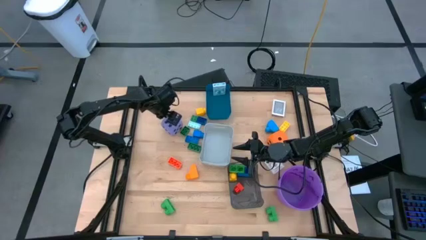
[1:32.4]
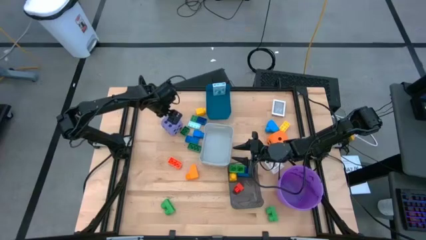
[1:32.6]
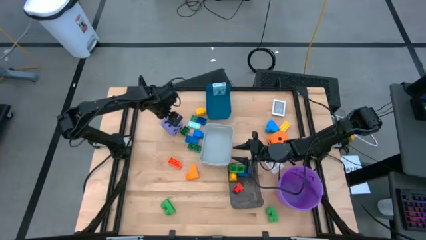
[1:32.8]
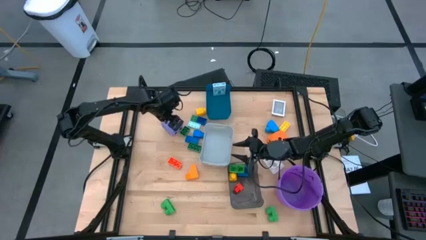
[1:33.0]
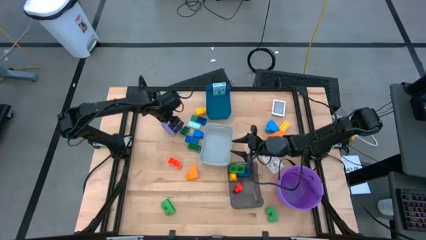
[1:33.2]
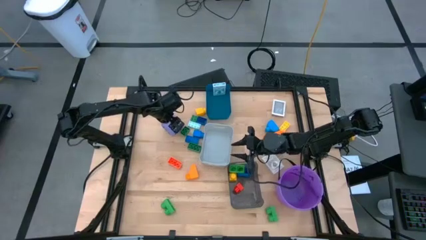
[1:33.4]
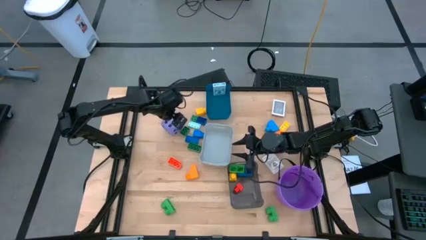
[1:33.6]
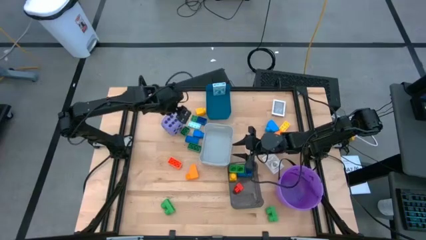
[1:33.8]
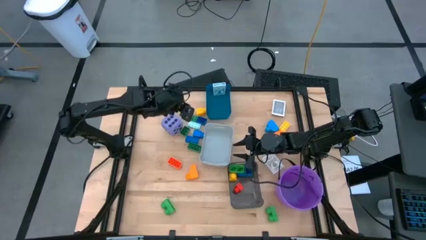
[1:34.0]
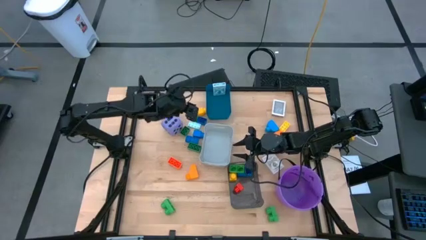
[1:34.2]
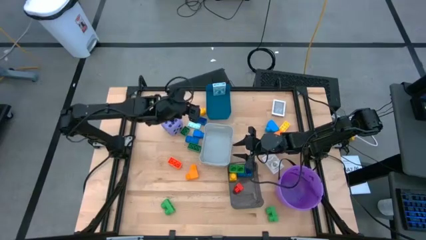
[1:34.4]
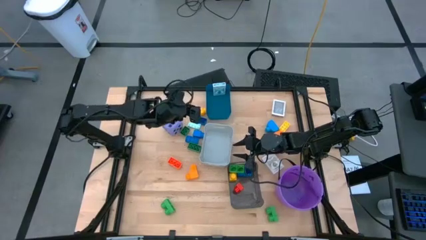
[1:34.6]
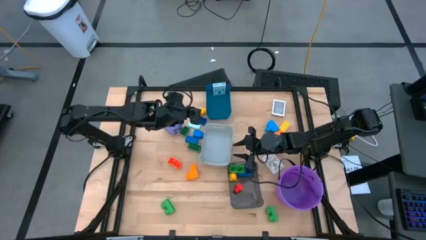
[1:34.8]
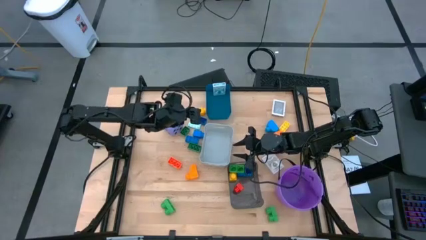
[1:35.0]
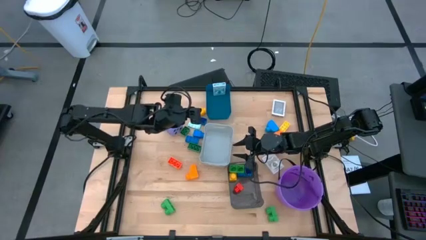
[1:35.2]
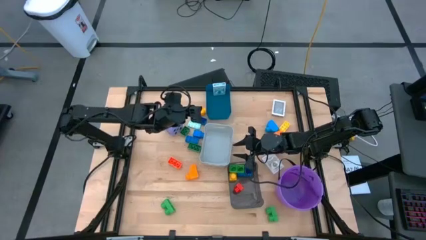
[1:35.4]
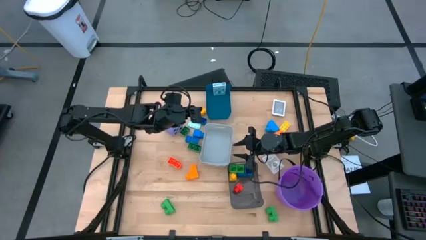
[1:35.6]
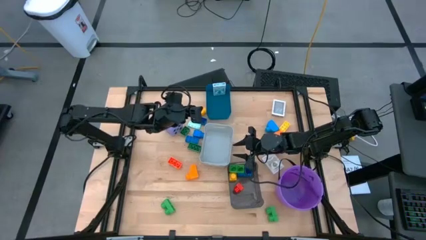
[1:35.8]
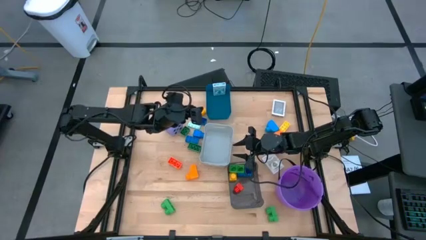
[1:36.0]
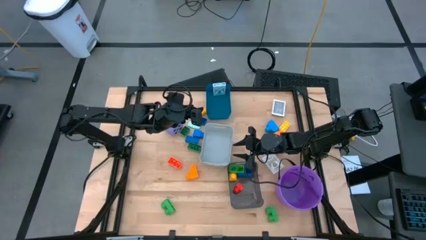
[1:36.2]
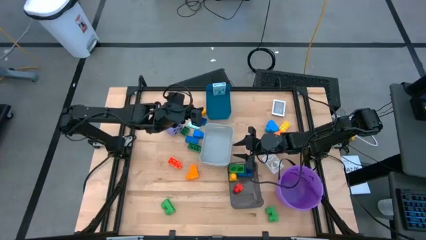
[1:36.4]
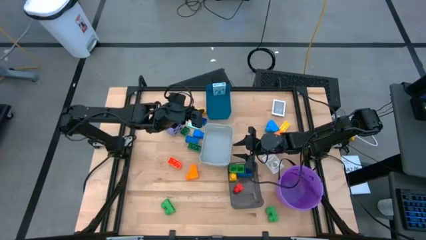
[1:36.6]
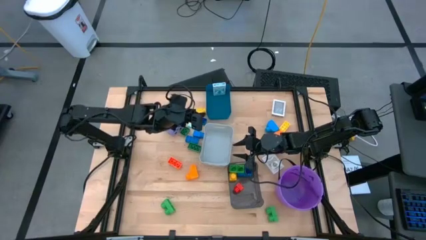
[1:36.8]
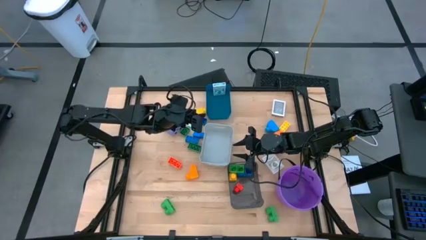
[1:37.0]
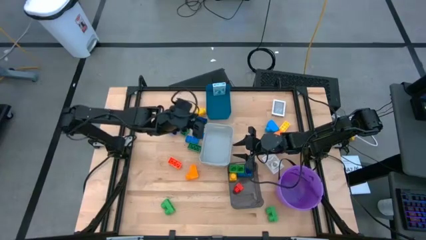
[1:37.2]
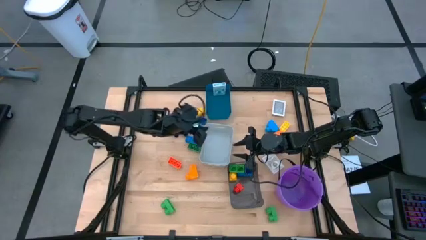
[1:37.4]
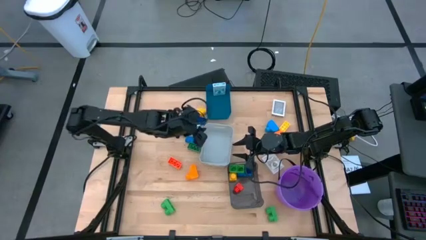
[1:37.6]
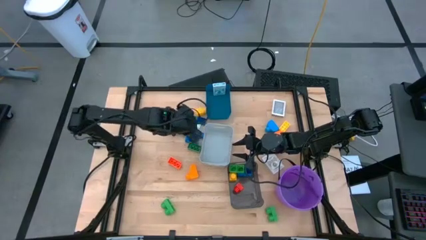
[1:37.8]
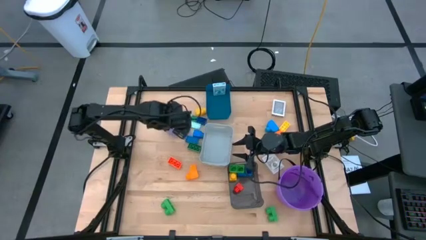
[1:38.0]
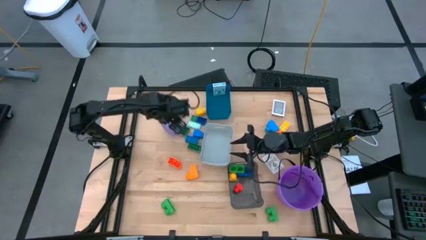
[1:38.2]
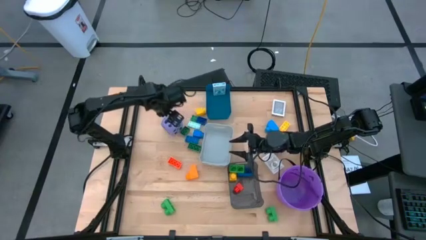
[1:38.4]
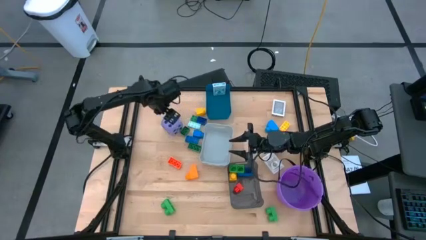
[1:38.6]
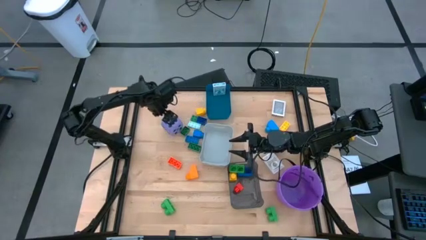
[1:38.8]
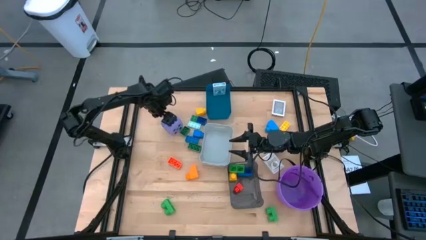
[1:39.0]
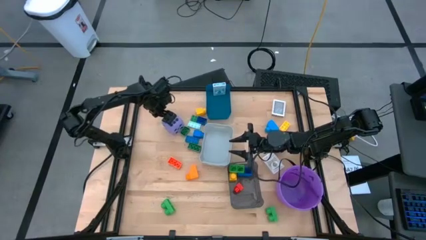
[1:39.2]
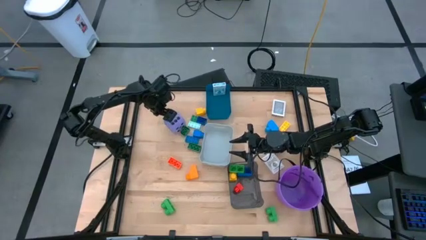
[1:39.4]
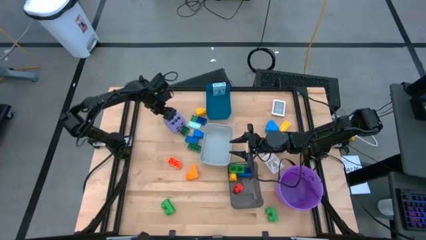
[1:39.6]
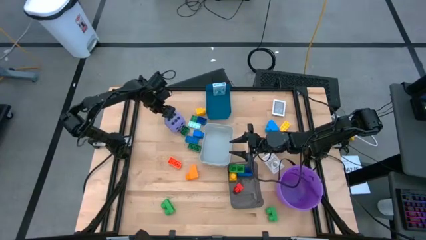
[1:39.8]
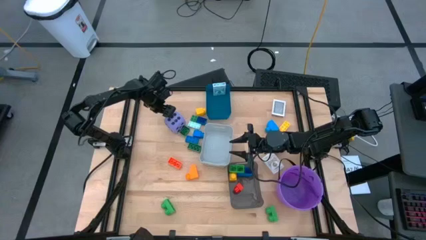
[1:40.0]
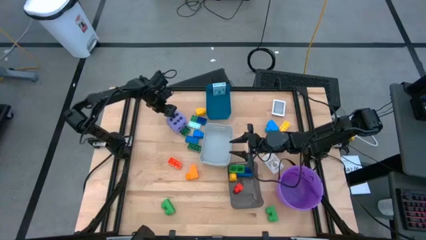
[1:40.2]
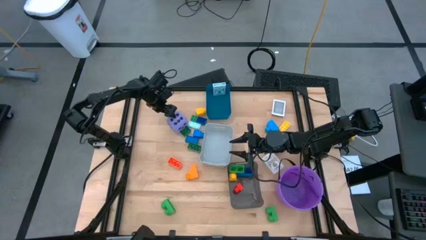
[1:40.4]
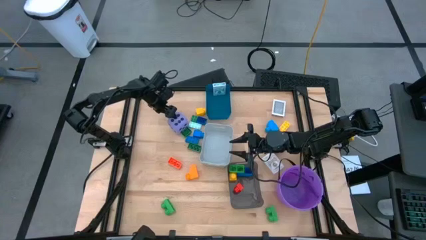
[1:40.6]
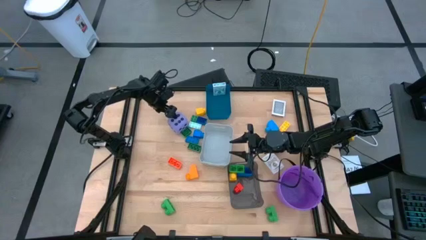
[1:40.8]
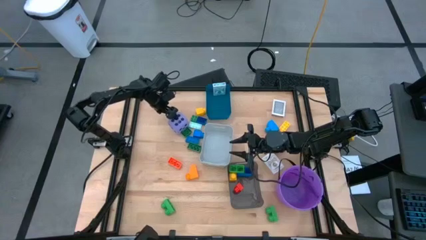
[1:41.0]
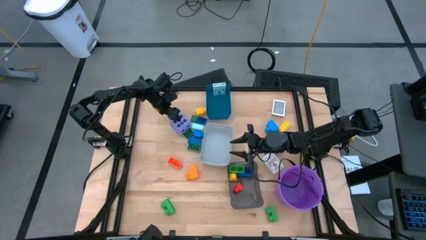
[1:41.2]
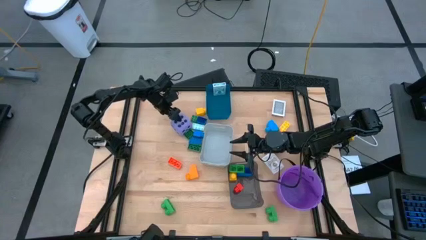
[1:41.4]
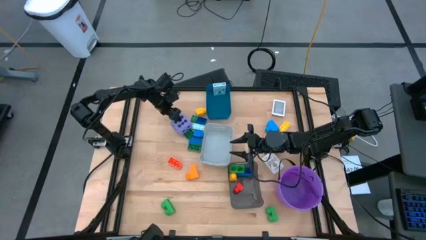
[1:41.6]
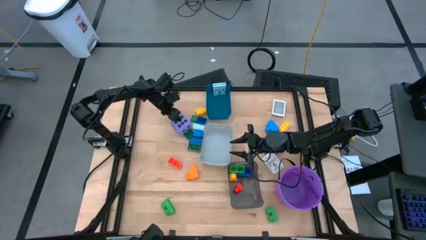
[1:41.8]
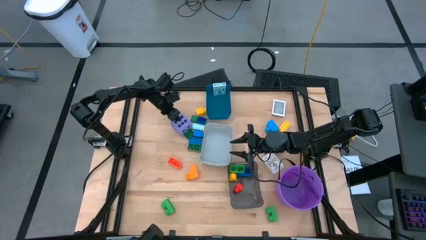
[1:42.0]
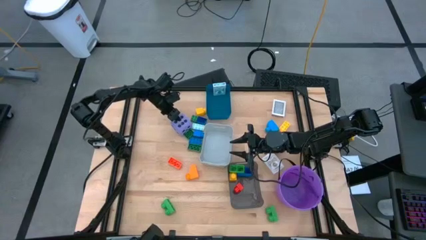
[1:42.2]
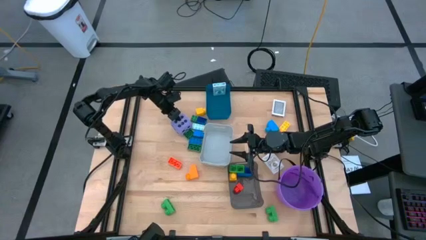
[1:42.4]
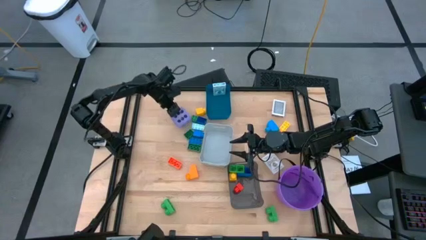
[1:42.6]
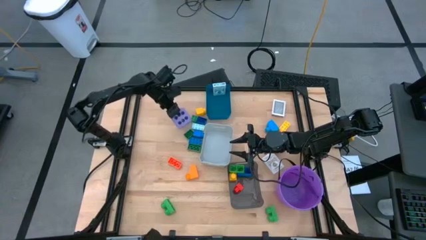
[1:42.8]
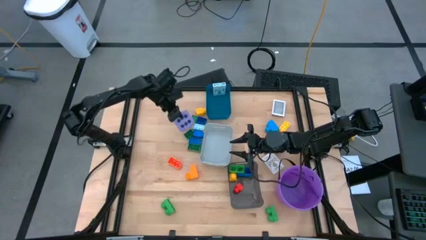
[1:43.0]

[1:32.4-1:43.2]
Task: Pick & Place Toys
Put the purple dice into the white bin

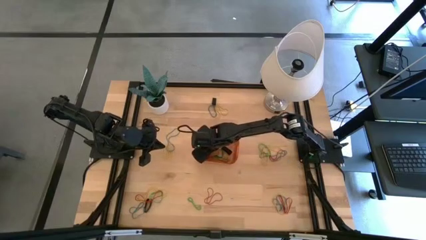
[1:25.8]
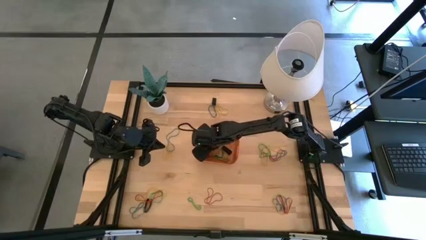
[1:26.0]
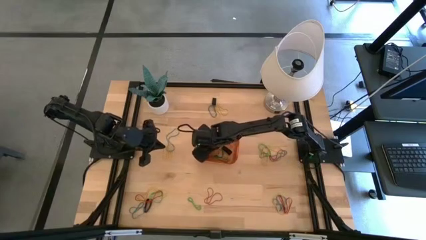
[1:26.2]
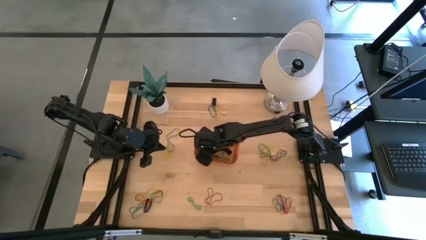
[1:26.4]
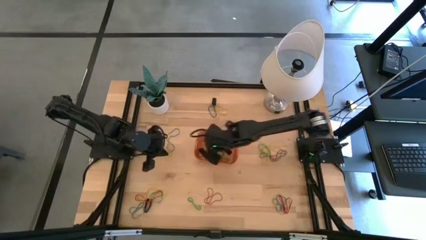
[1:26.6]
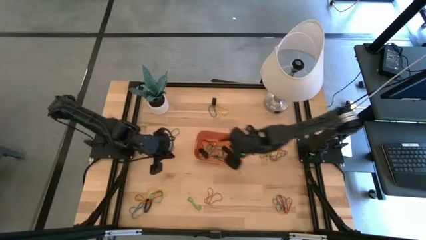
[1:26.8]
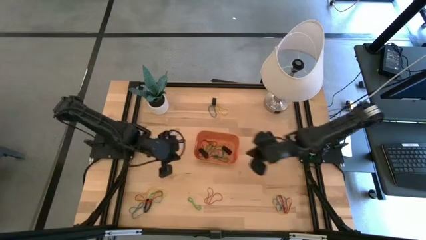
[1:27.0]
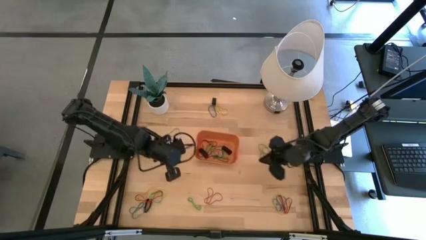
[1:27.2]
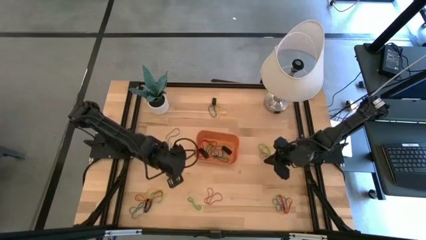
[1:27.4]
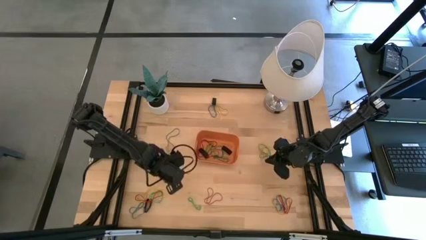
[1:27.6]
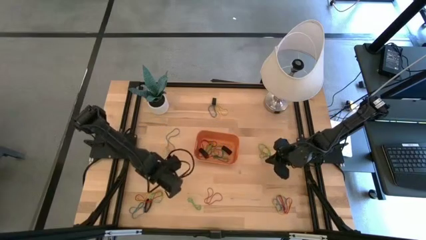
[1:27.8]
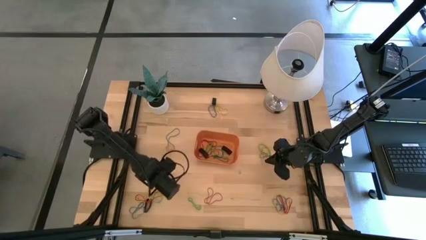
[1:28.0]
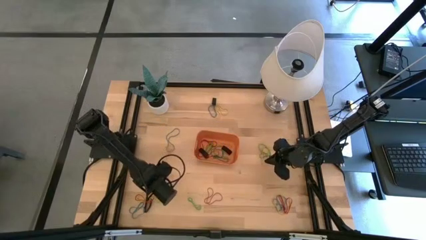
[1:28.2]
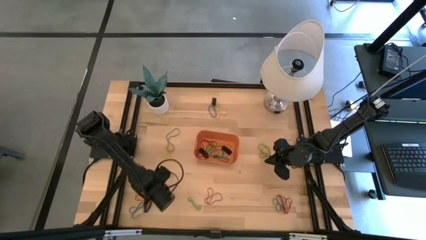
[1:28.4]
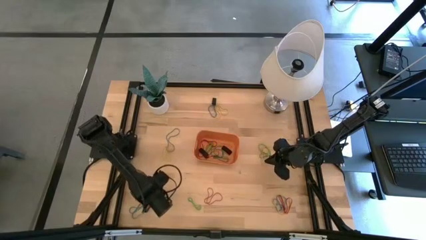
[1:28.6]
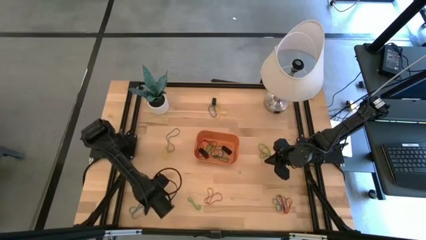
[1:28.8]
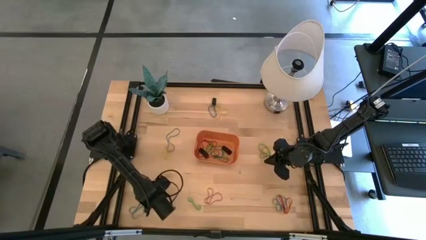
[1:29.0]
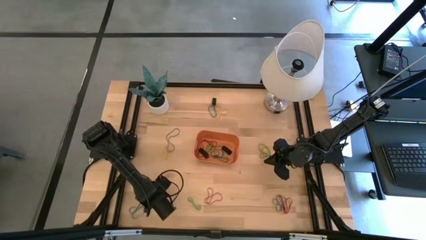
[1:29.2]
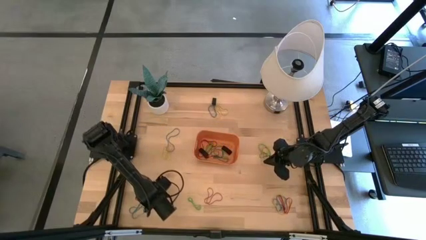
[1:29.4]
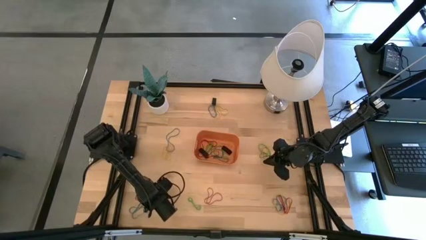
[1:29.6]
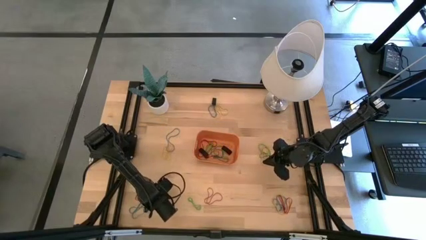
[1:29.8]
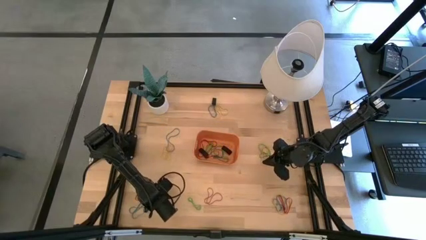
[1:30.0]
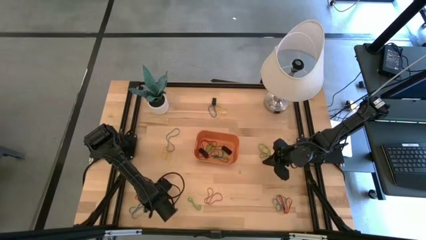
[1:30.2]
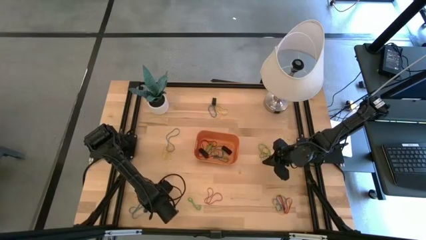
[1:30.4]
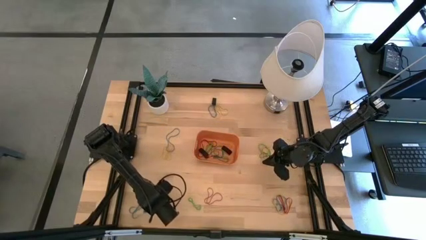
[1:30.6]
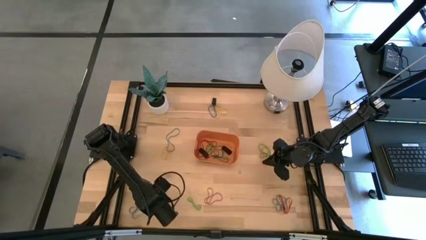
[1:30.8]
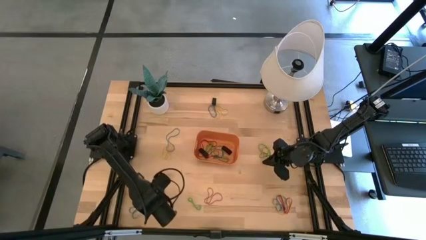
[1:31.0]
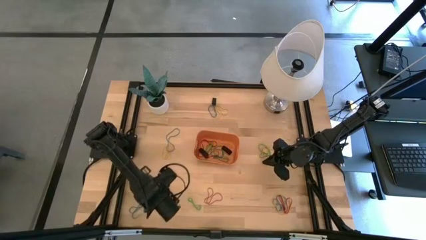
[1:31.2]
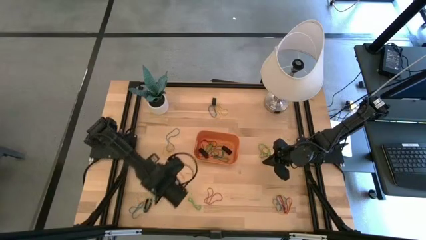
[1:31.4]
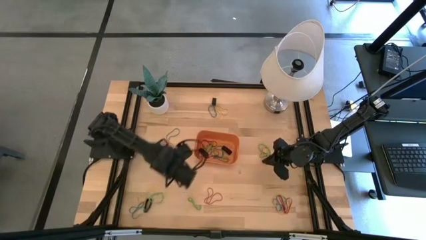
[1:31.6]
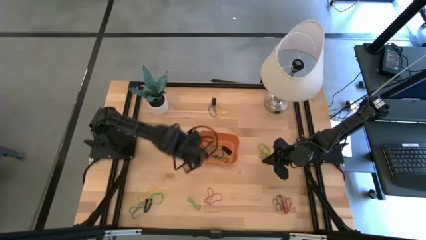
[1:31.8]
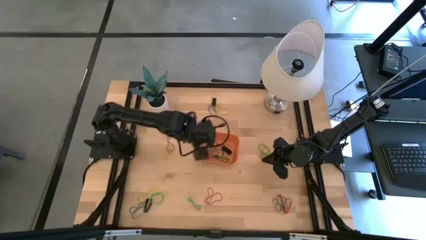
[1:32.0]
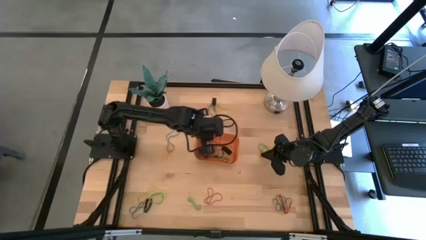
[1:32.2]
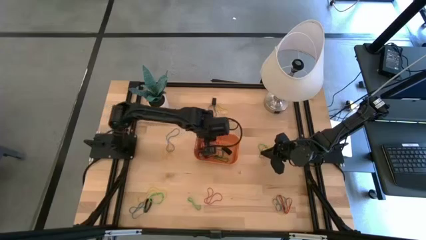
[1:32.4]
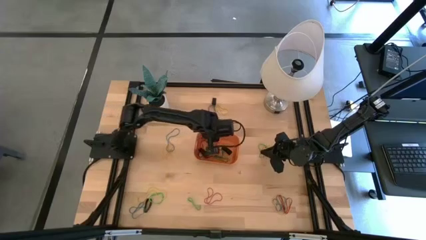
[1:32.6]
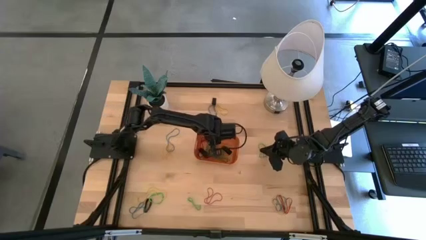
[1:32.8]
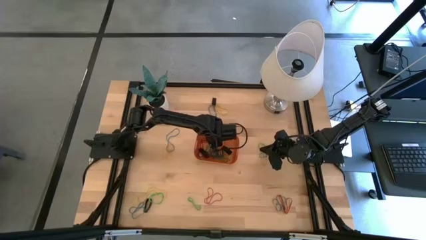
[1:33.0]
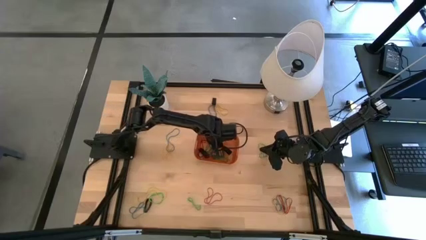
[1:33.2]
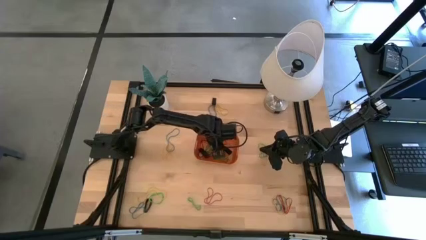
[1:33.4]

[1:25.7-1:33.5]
Task: Pick and place rubber bands into bin
Put the red rubber band into the orange bin
